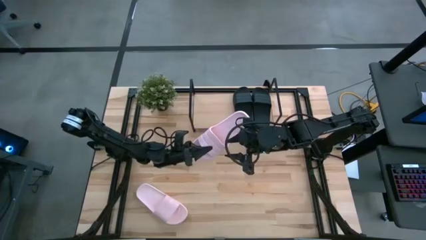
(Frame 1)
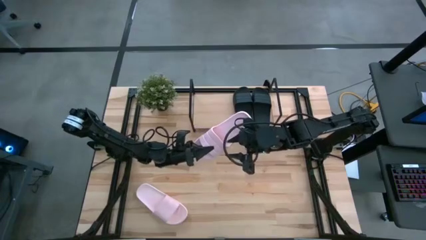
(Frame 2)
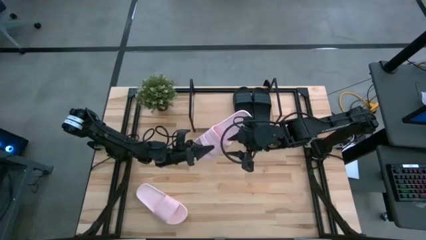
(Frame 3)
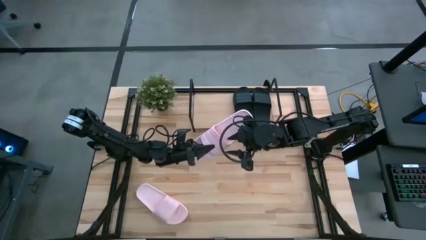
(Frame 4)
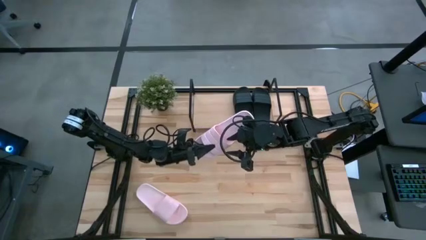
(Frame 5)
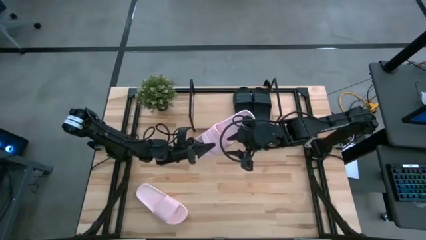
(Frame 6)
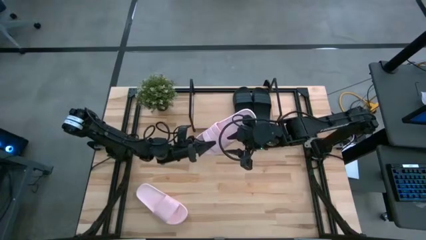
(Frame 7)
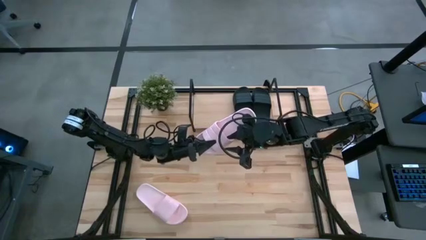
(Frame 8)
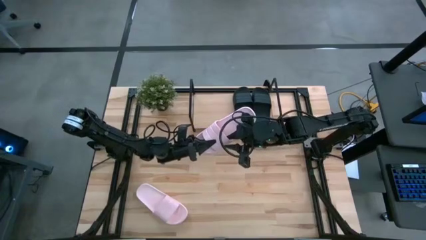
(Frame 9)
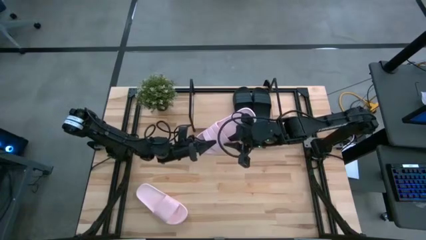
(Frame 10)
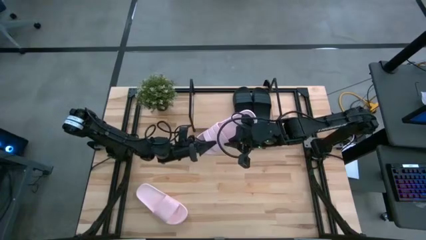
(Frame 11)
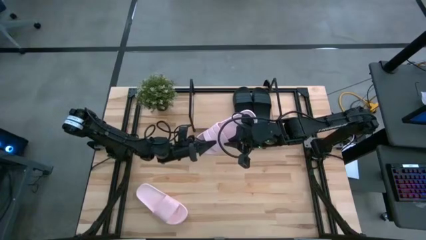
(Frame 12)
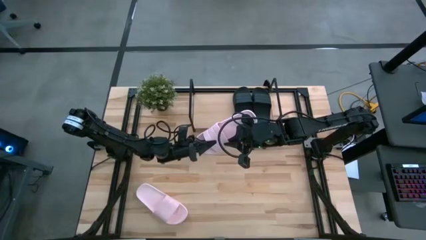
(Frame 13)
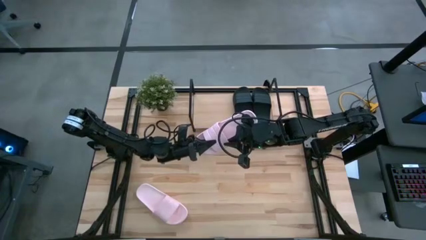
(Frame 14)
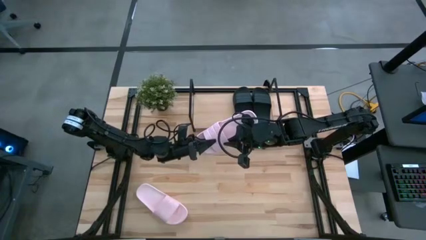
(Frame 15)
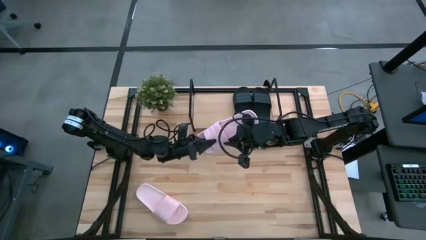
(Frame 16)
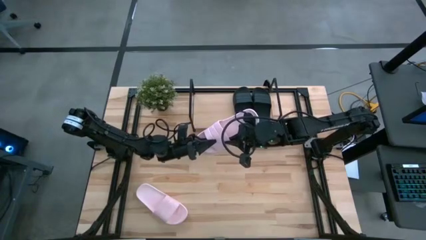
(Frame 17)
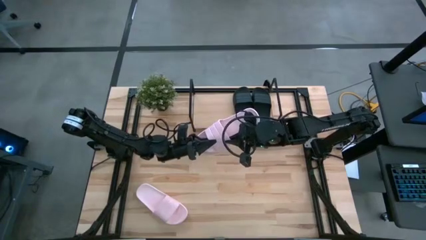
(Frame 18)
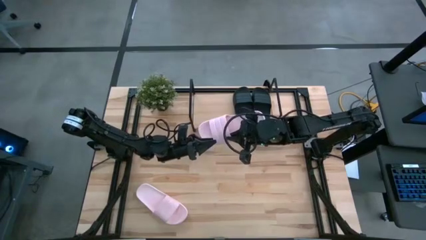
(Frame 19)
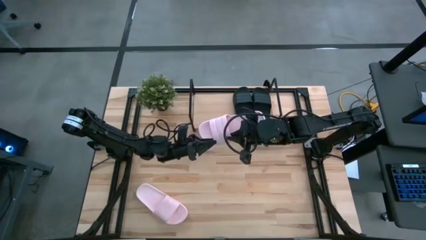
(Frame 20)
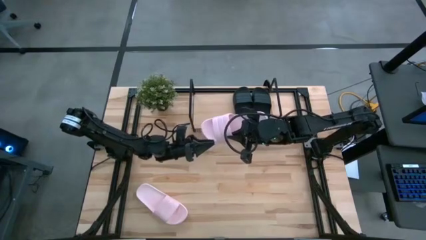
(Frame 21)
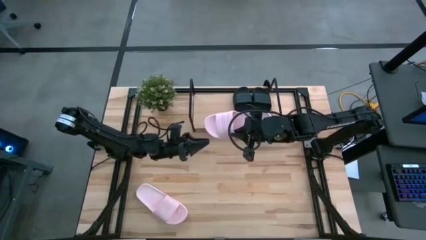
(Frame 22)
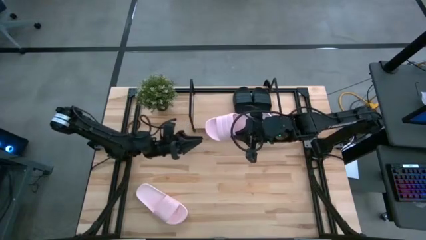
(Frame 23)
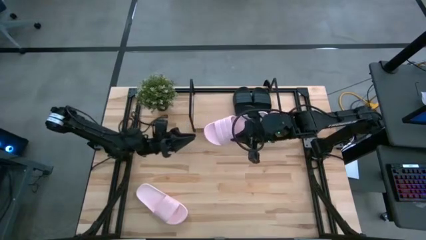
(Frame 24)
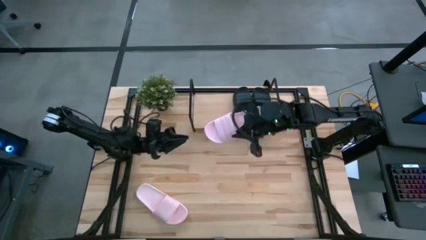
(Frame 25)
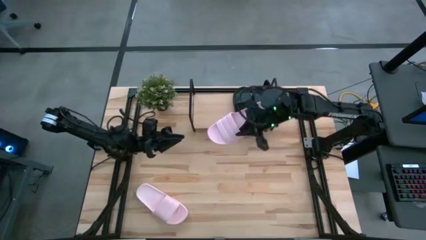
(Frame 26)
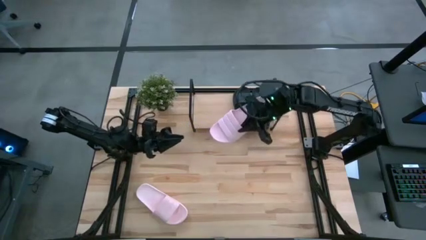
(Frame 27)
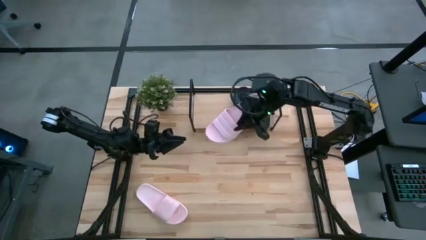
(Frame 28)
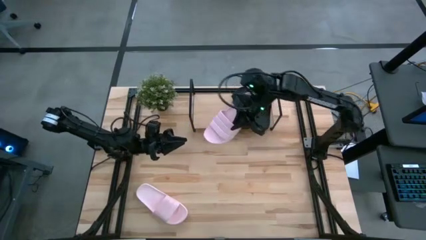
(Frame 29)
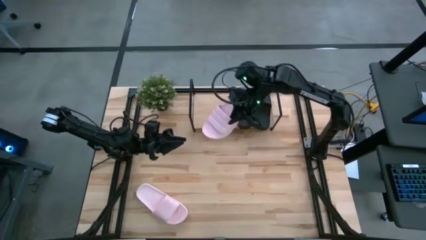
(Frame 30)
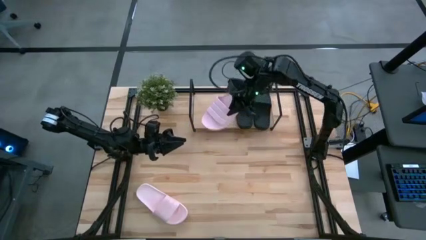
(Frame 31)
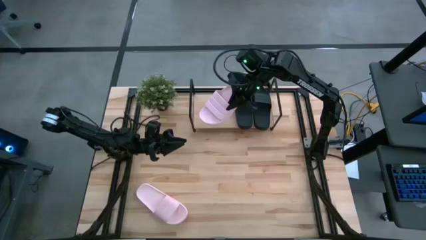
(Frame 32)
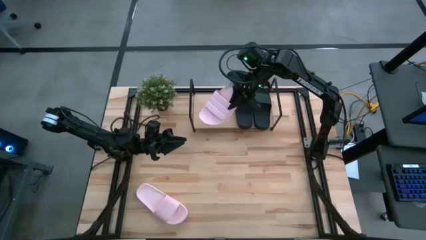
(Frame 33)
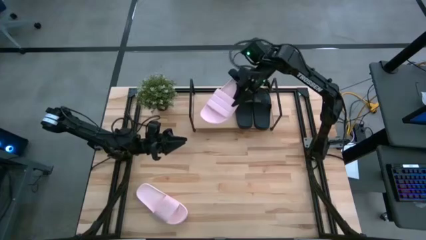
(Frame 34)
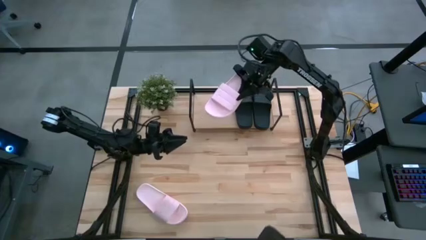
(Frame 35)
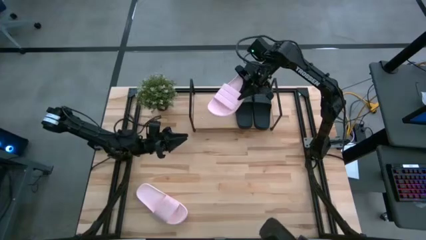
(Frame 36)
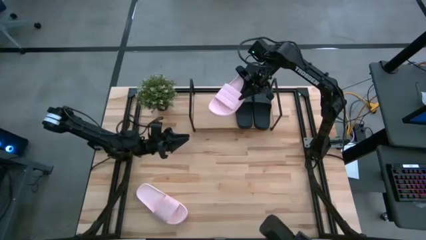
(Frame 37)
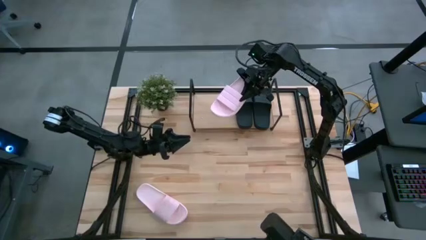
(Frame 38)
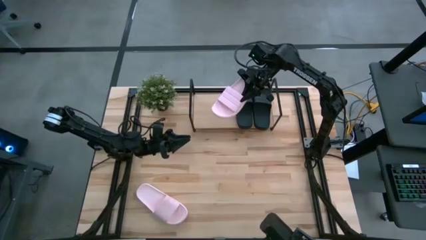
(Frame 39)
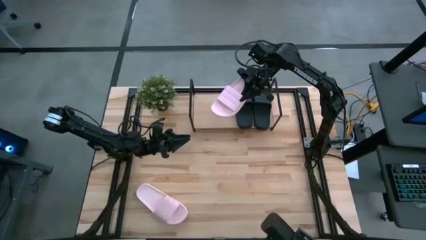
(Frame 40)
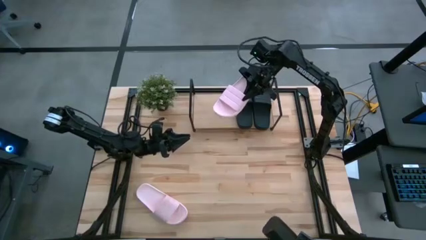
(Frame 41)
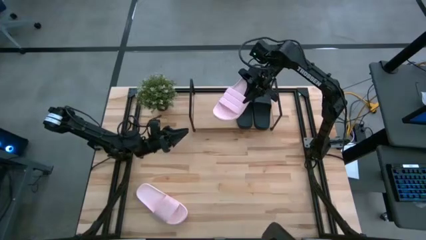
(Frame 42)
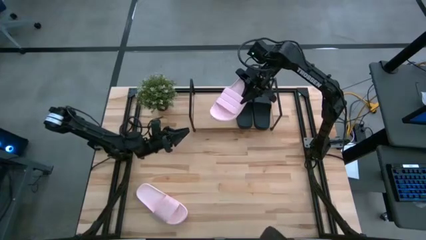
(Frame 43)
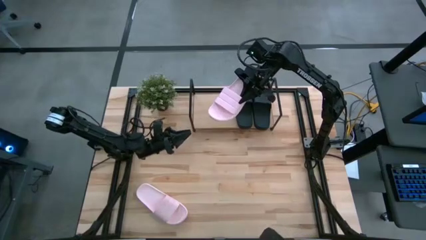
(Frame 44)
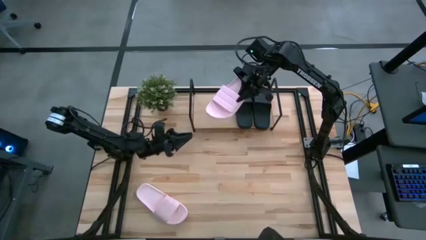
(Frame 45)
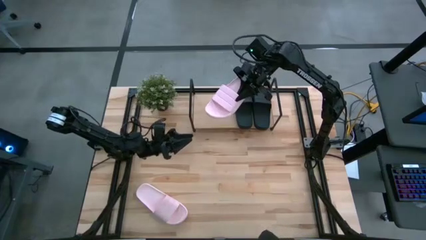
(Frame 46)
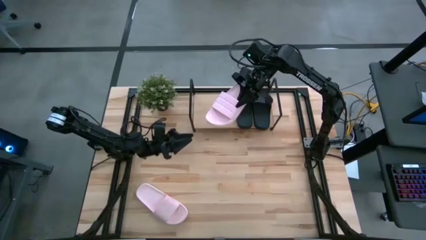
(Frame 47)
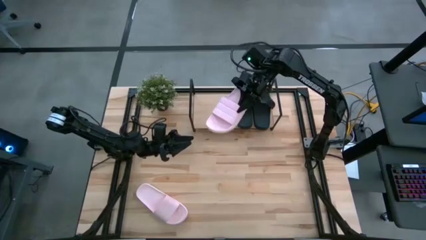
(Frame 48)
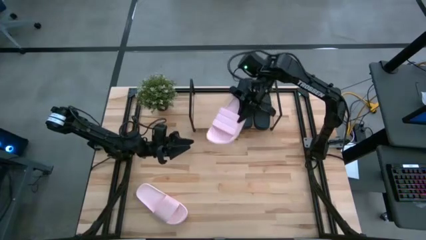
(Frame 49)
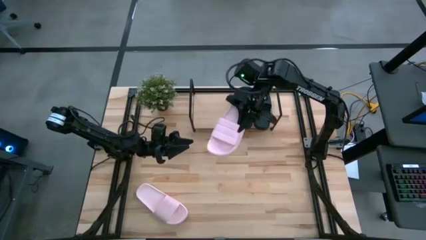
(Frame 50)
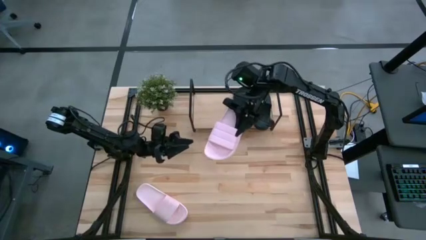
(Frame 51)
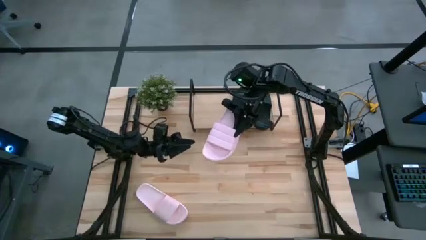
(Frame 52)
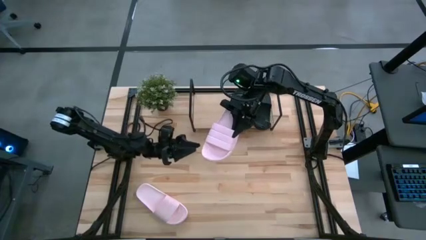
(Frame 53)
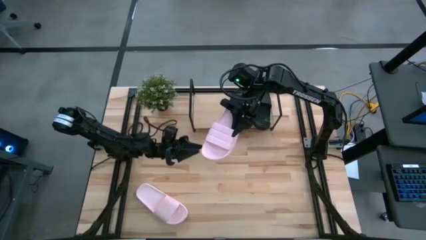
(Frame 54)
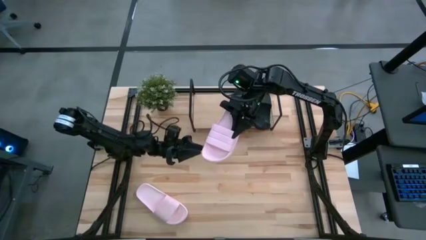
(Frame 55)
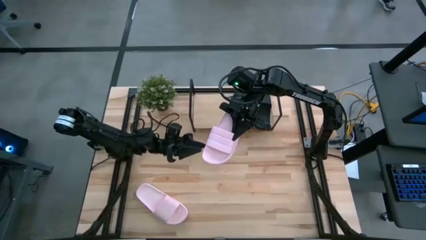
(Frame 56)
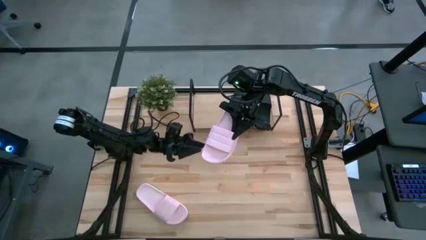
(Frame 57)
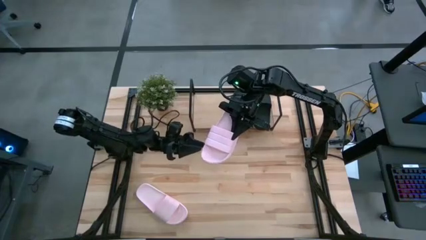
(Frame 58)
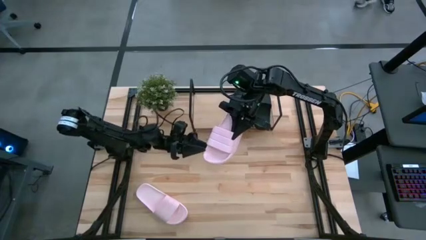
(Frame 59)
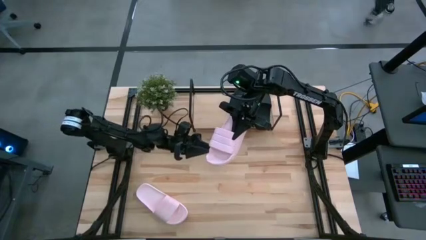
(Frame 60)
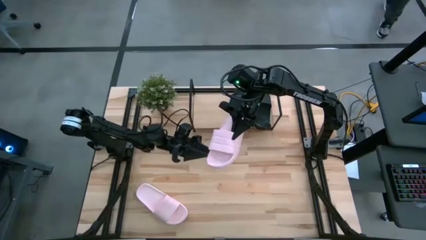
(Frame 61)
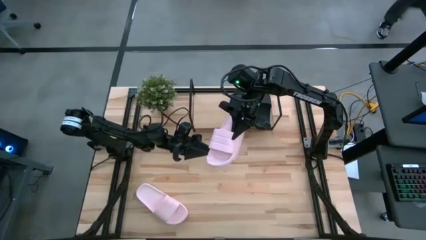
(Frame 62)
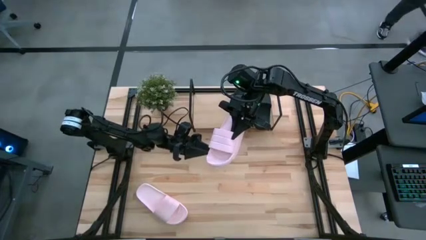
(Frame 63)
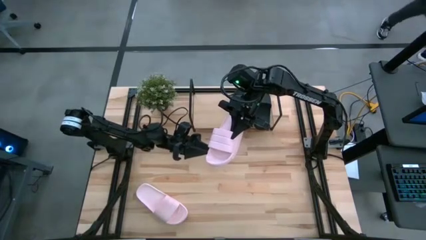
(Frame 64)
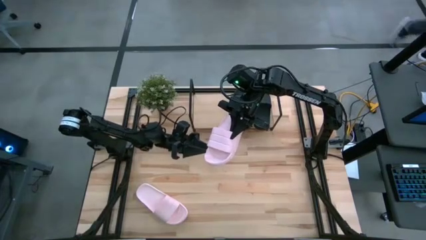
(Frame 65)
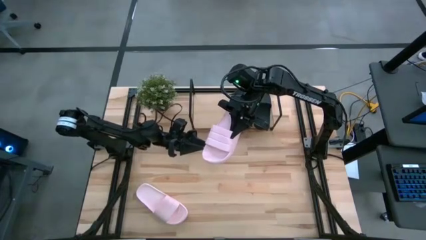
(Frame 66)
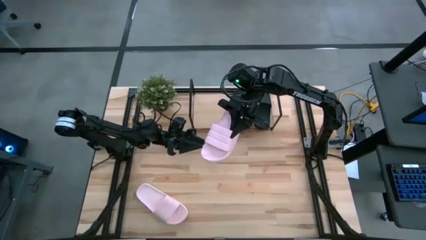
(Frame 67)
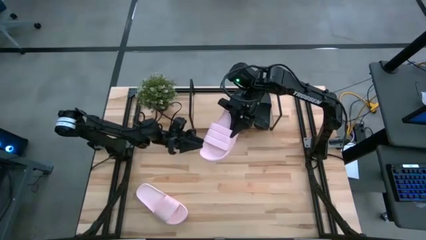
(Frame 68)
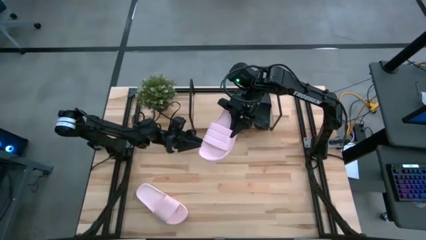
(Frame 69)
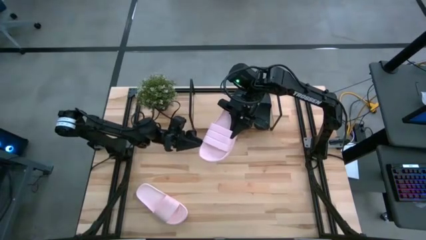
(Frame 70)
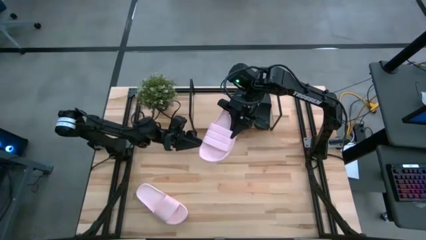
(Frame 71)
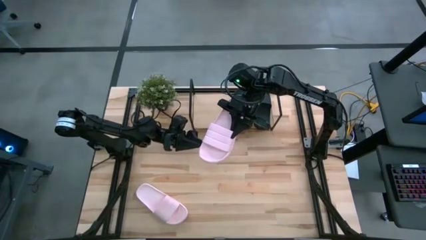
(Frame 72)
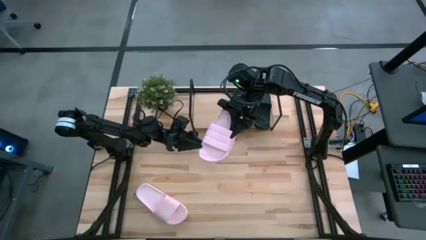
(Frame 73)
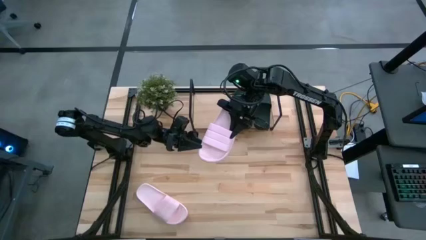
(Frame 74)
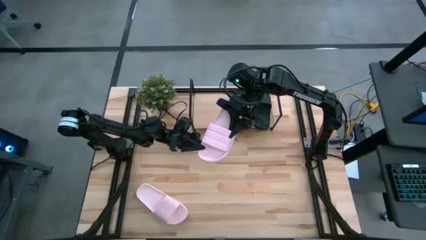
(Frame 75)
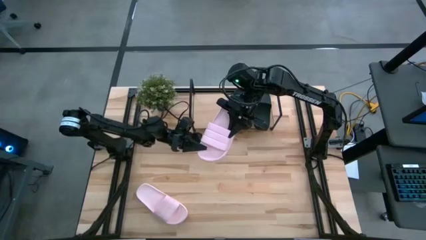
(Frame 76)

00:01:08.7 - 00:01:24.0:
Task: Pick and place slides into the shelf
Put the top pink slipper on the shelf
